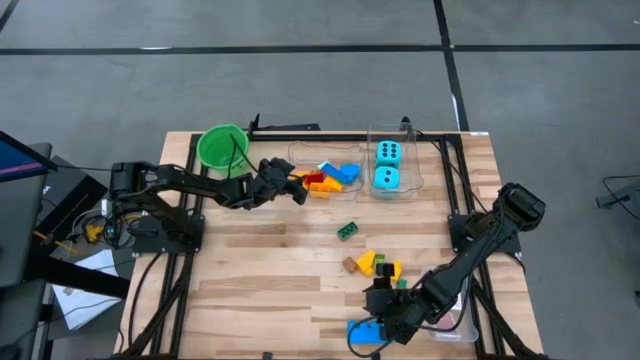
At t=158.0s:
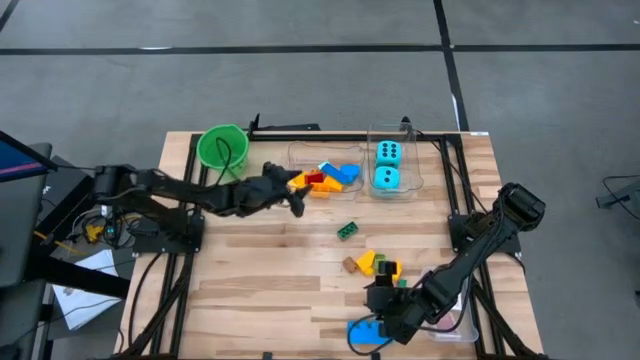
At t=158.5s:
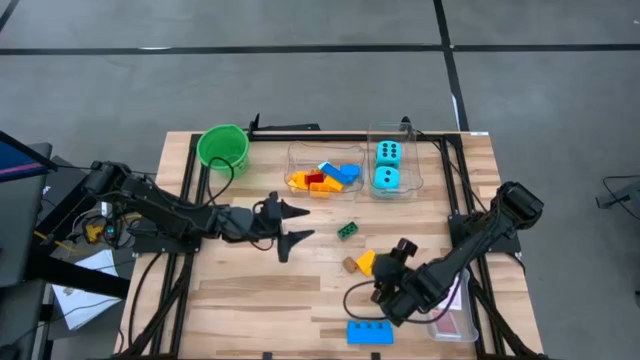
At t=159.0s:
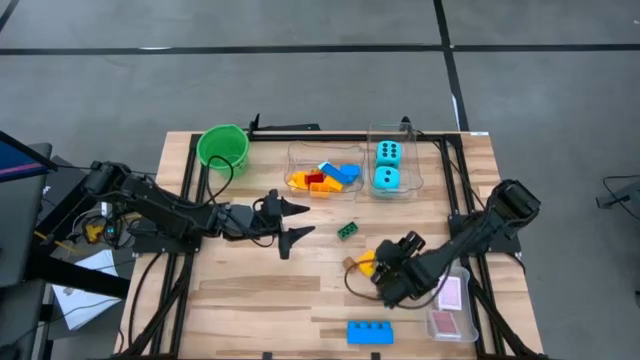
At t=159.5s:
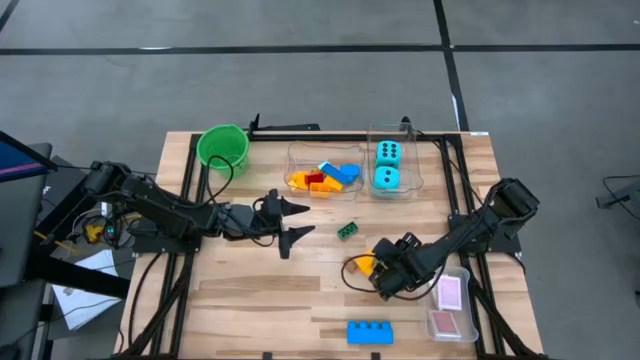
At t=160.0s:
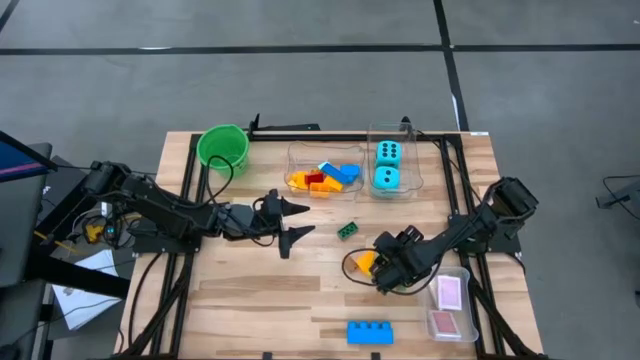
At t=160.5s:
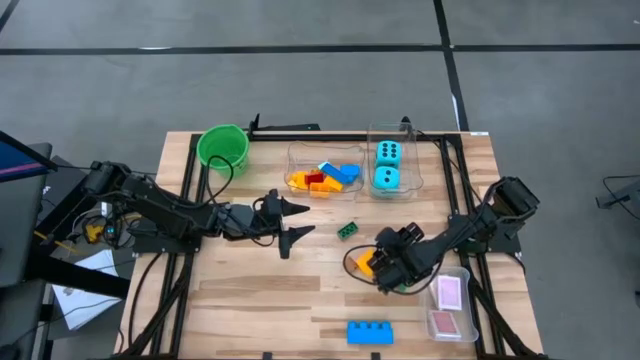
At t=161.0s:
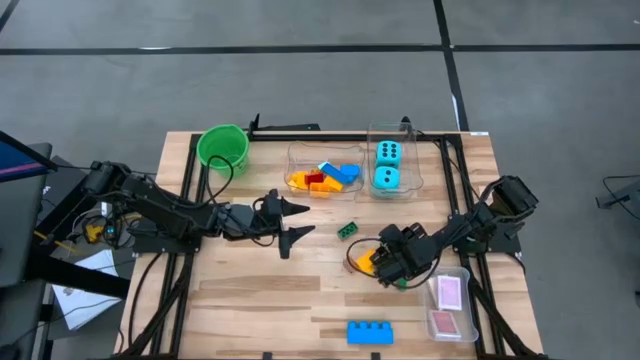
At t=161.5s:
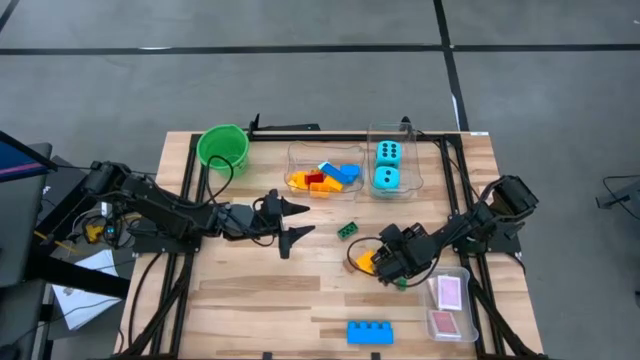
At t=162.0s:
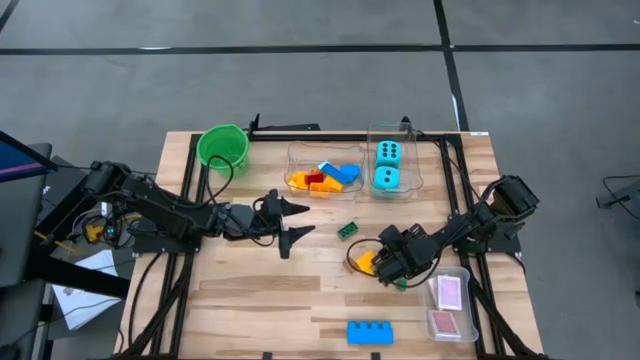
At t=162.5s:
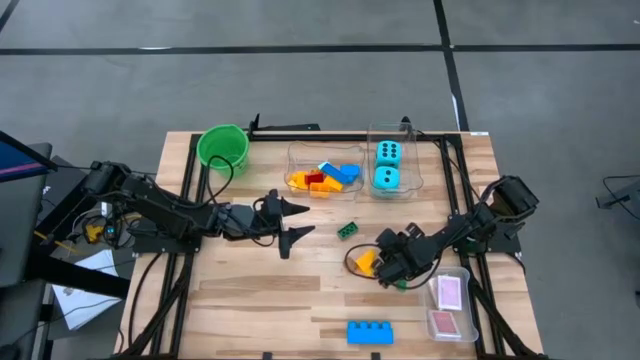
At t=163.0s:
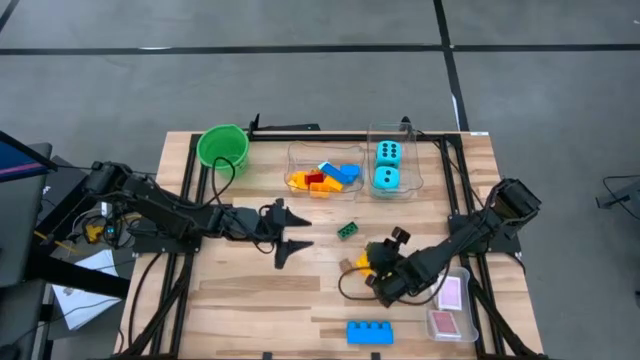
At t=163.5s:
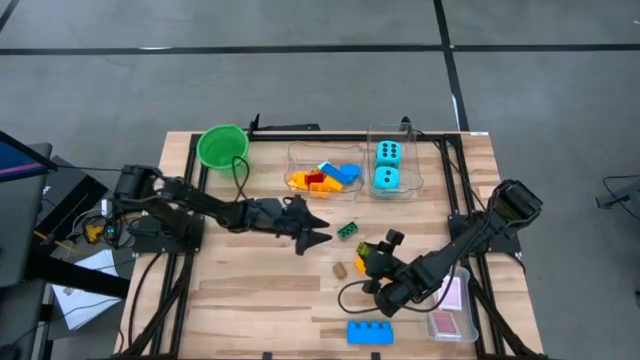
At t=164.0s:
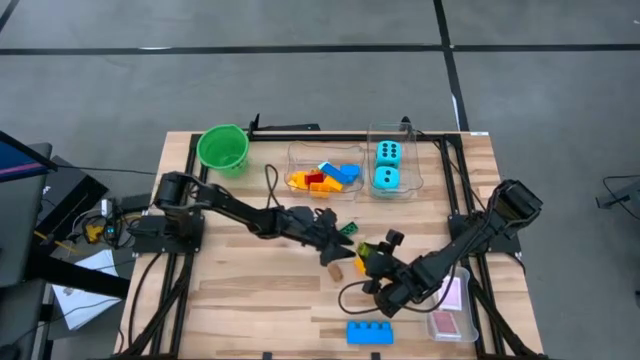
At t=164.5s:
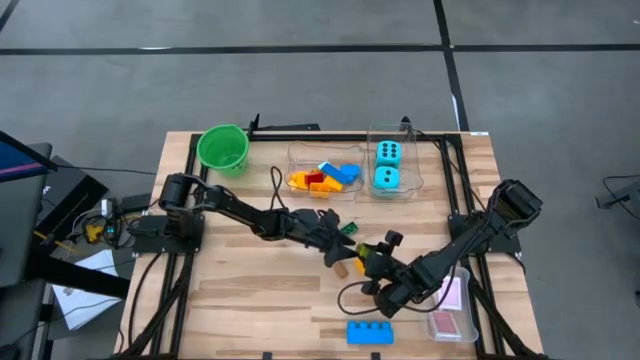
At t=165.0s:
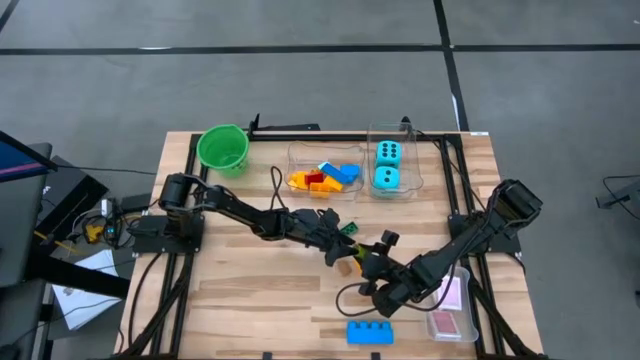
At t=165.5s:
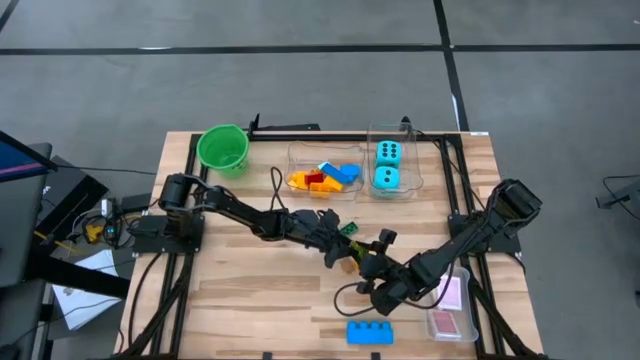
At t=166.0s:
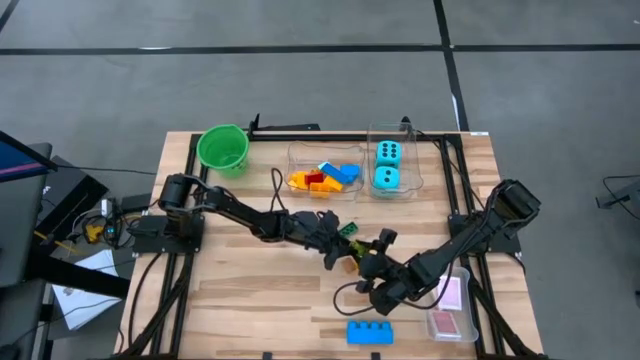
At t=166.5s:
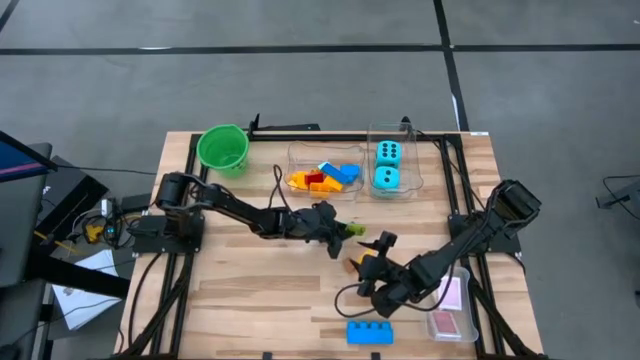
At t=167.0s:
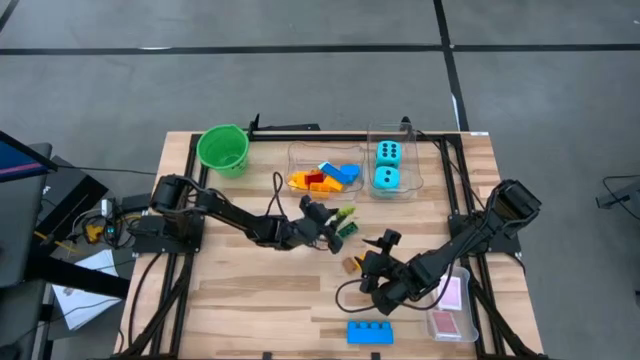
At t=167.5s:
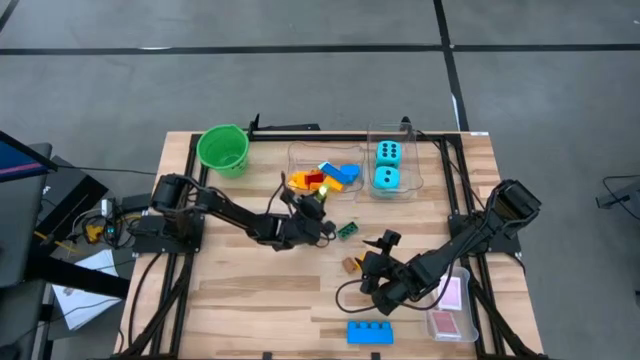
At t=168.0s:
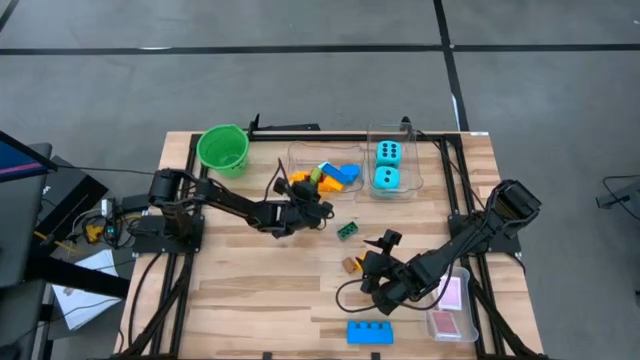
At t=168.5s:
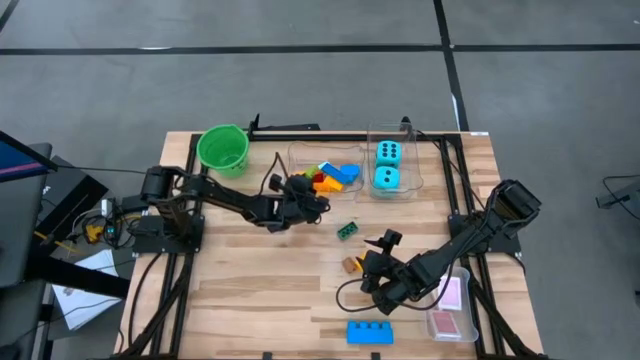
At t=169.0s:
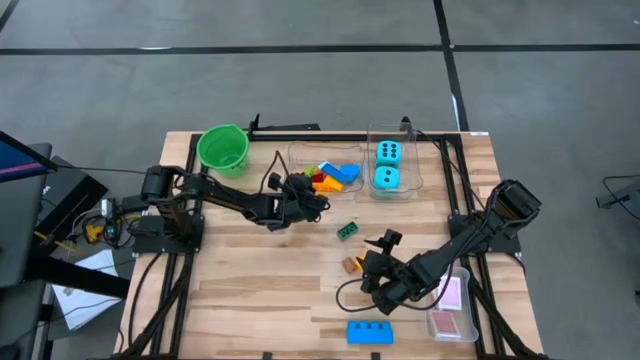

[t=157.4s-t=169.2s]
Task: Pick & Place Toys
Put the green gamepiece into the left transparent bin

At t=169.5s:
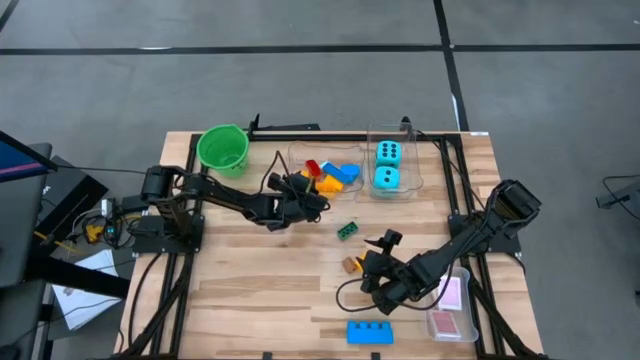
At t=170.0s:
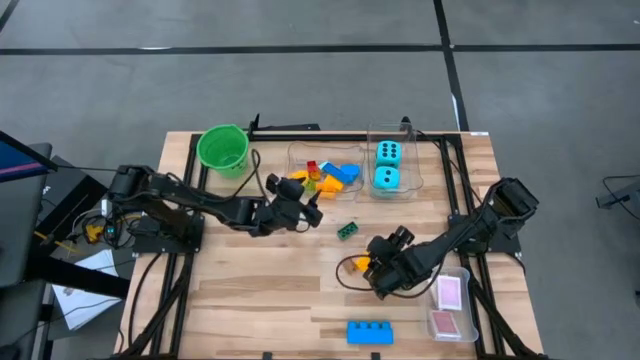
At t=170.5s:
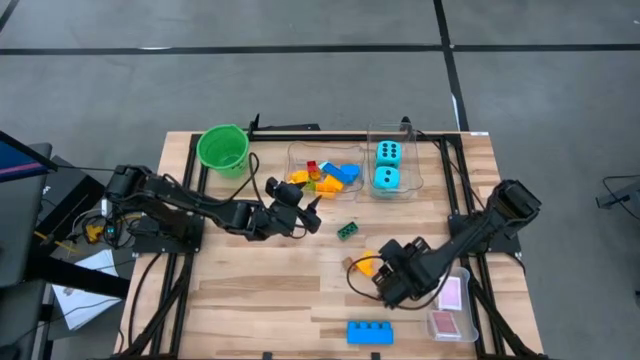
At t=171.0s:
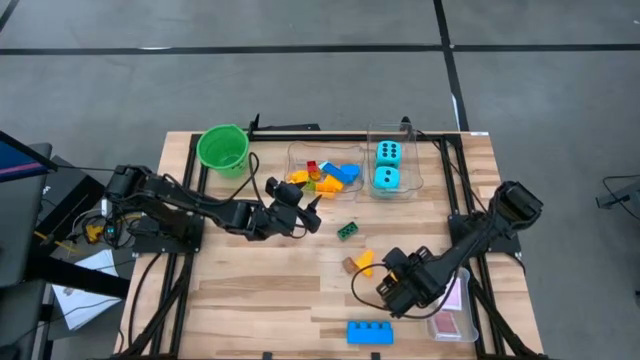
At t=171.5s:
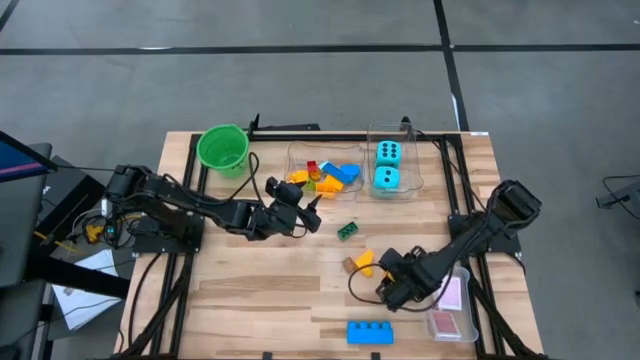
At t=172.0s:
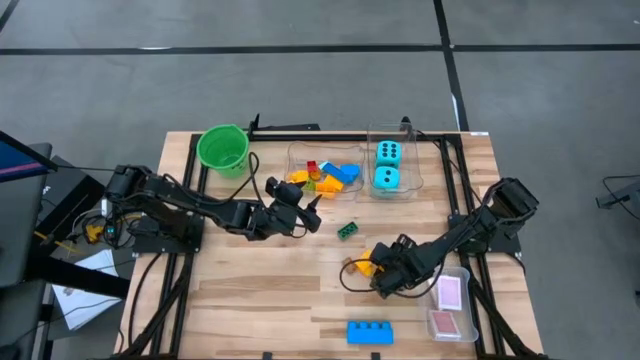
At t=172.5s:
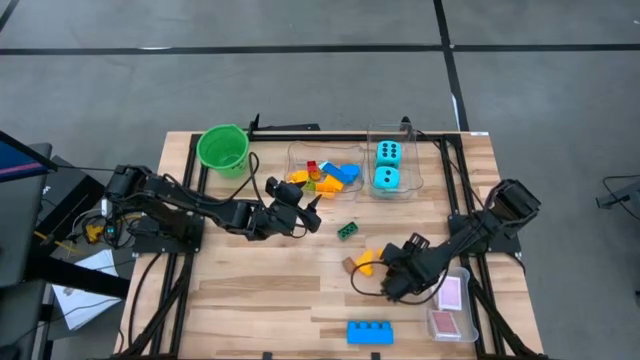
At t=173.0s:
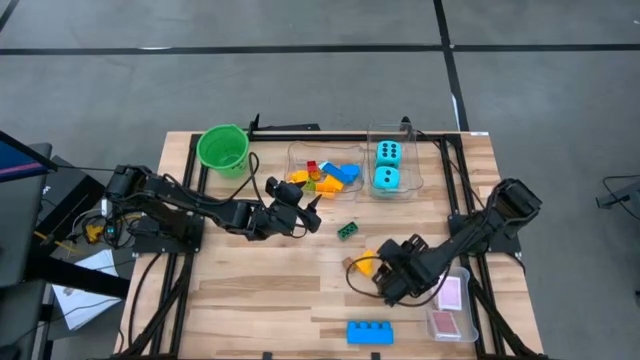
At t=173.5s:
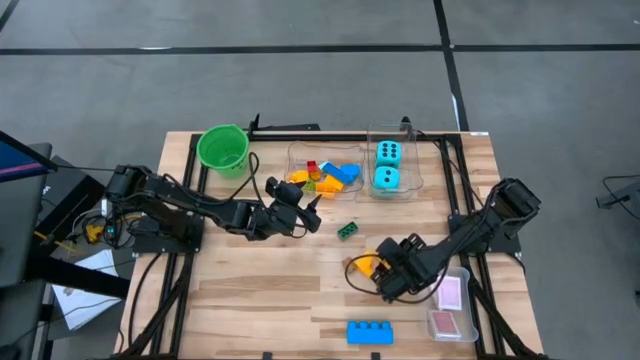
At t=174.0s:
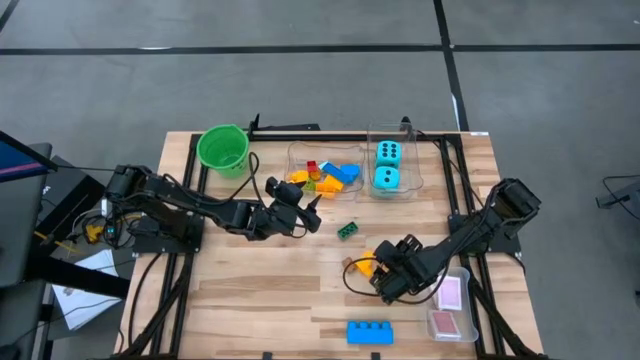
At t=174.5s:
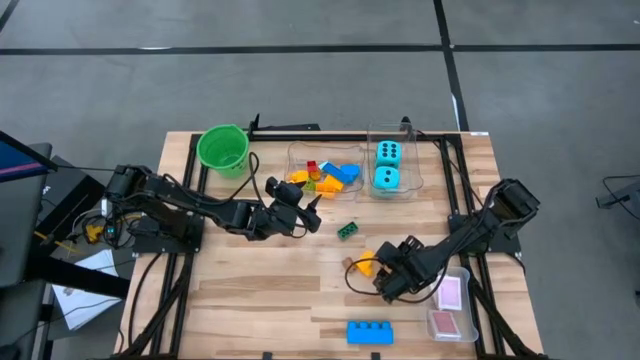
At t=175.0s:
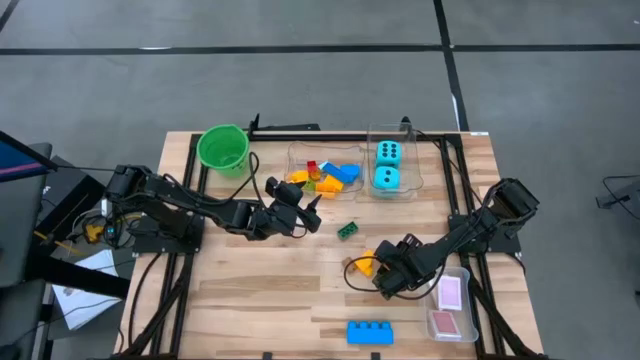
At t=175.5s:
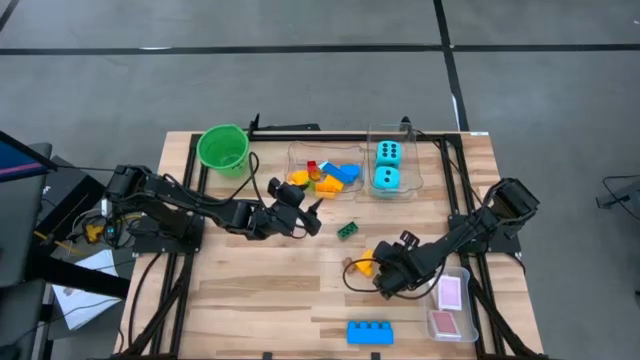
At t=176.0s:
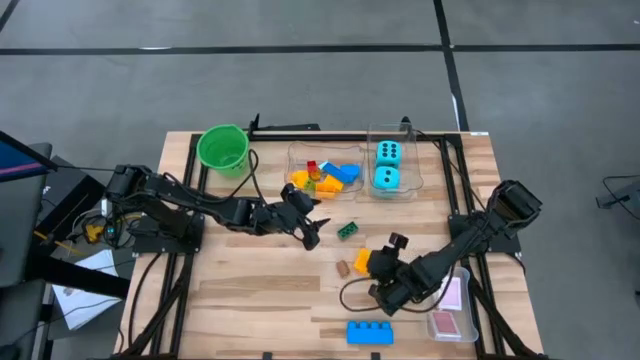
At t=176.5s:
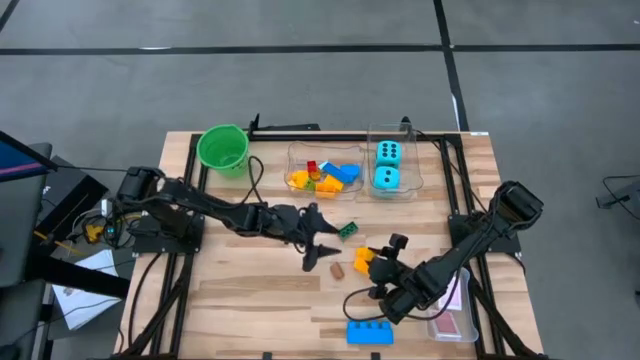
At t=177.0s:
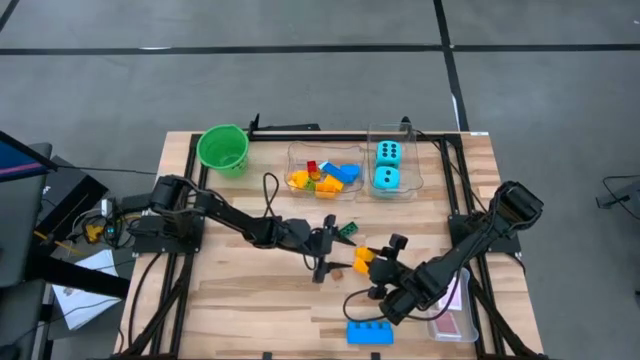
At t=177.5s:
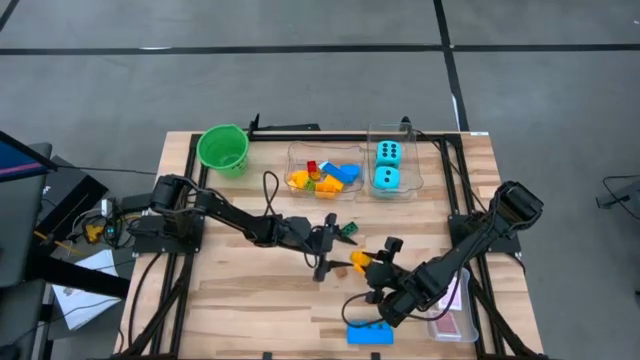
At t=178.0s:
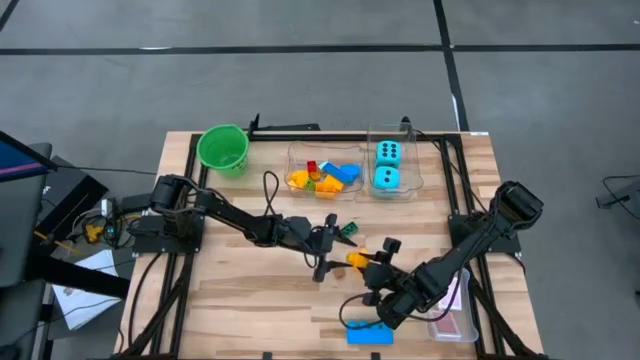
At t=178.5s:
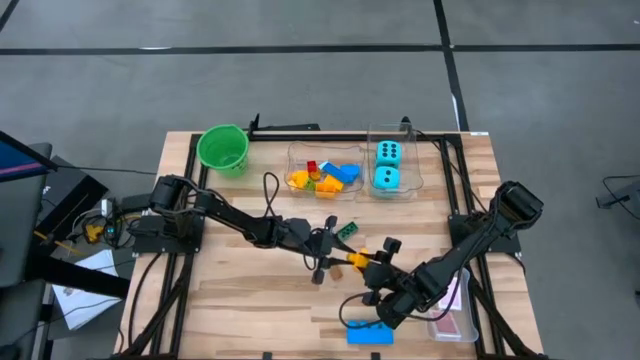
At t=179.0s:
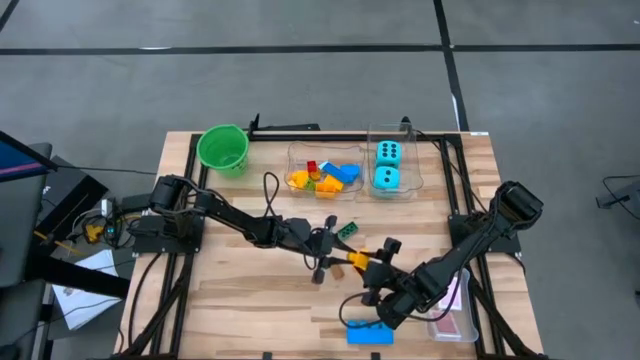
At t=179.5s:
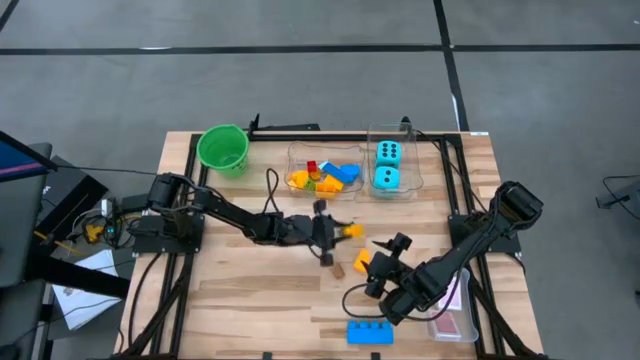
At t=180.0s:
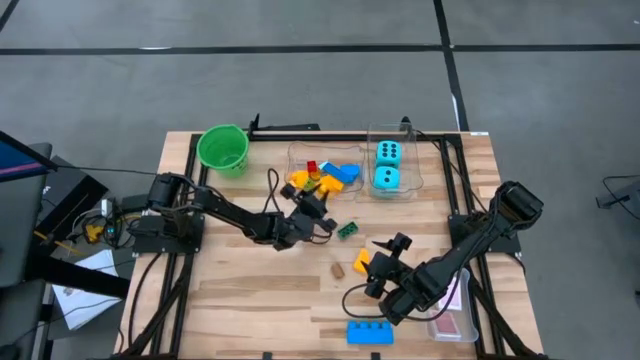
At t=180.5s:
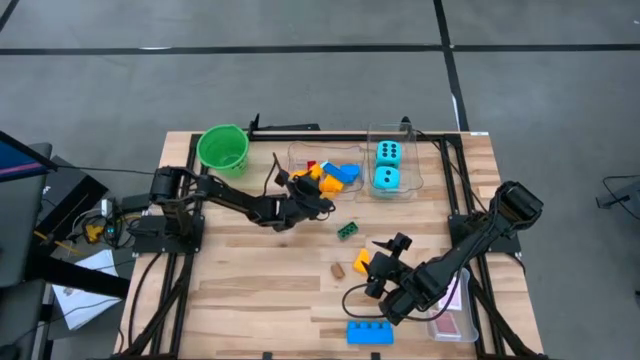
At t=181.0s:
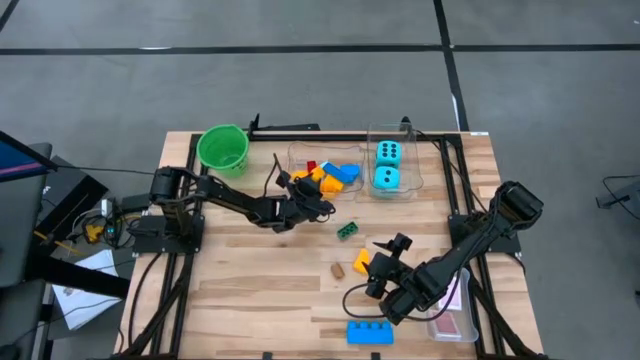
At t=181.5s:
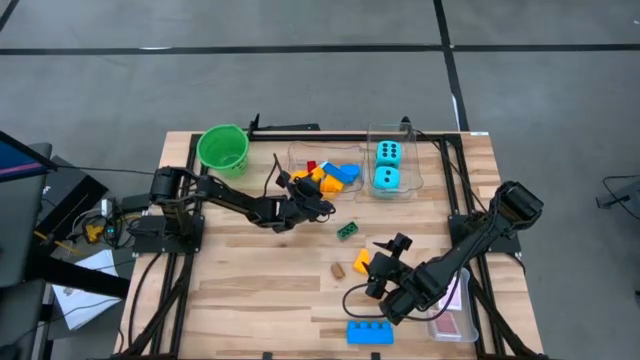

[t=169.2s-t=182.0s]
Put the yellow gamepiece into the left transparent bin
